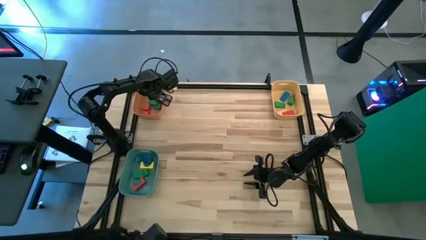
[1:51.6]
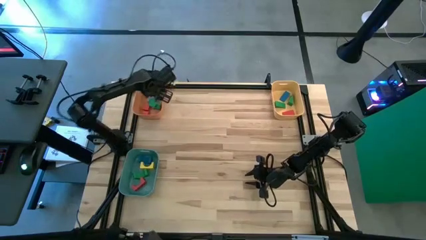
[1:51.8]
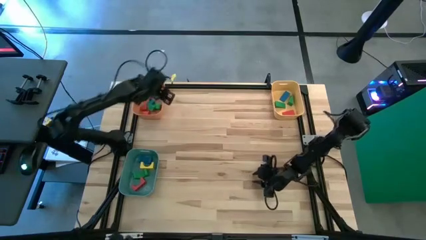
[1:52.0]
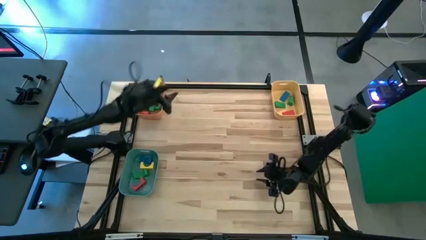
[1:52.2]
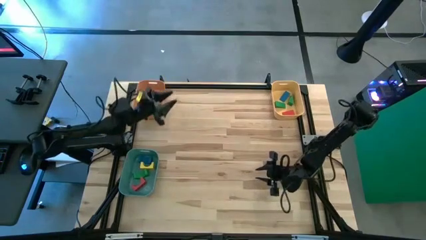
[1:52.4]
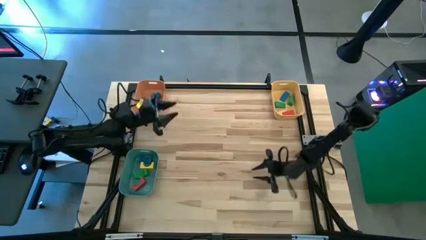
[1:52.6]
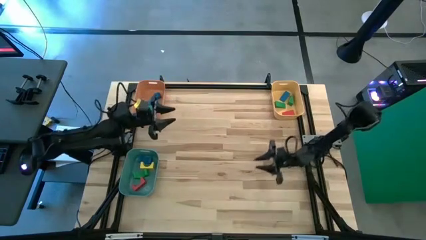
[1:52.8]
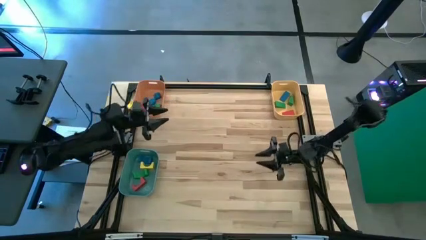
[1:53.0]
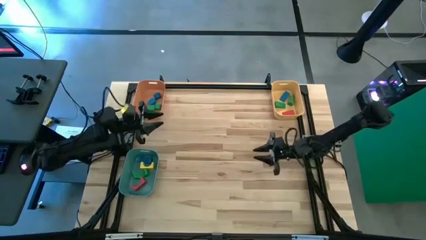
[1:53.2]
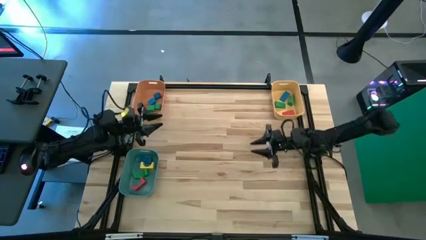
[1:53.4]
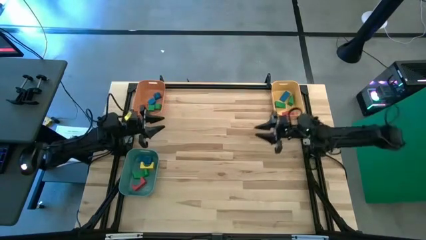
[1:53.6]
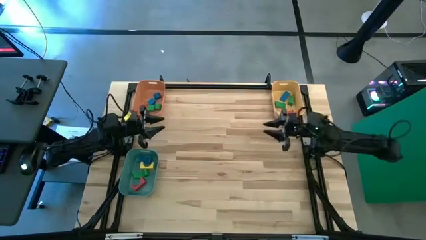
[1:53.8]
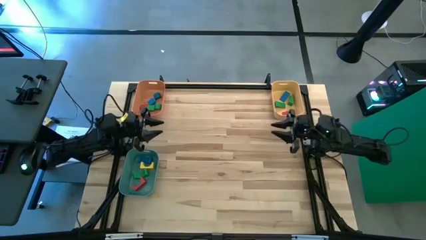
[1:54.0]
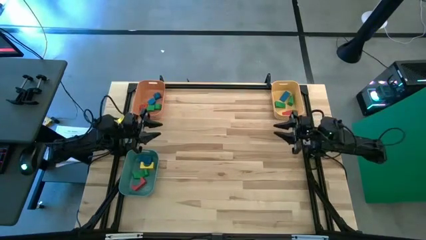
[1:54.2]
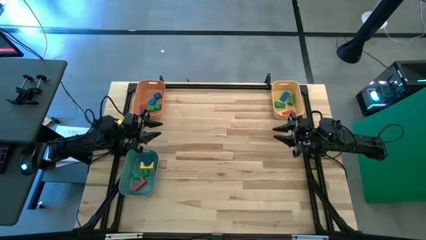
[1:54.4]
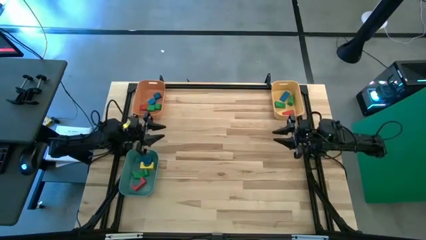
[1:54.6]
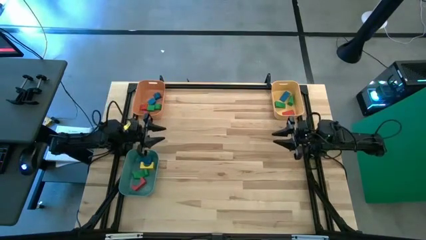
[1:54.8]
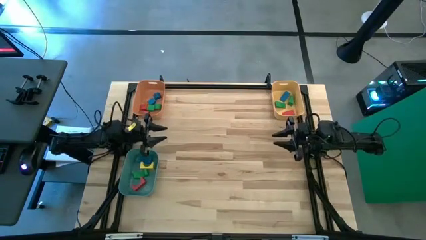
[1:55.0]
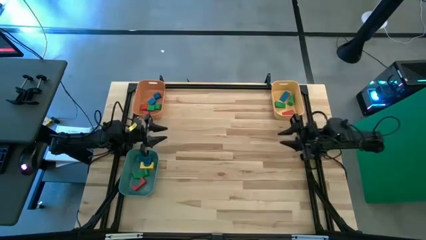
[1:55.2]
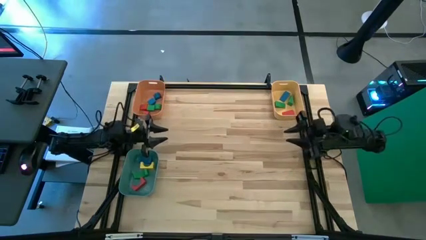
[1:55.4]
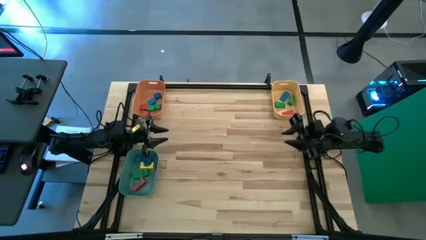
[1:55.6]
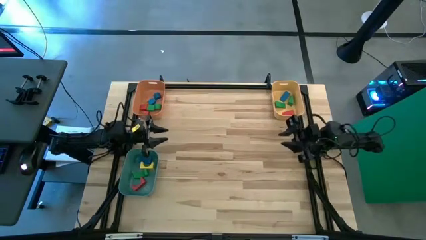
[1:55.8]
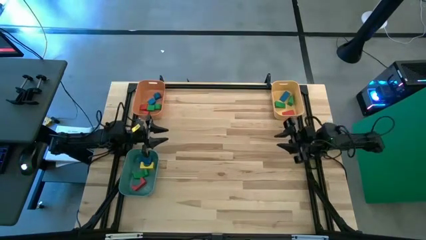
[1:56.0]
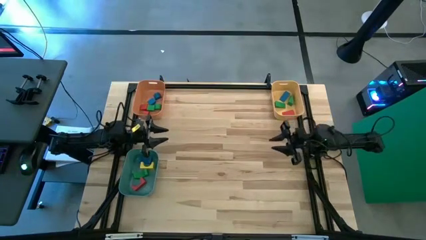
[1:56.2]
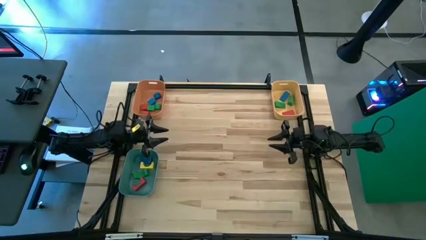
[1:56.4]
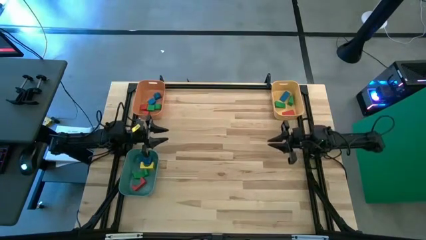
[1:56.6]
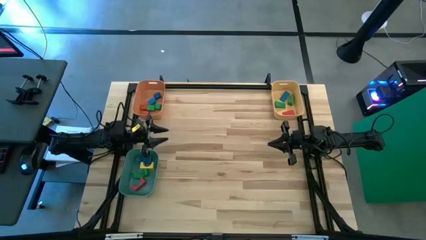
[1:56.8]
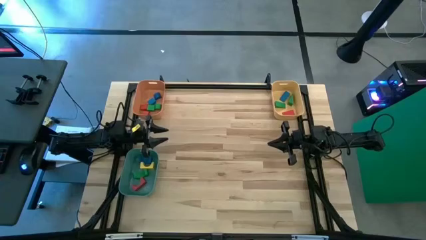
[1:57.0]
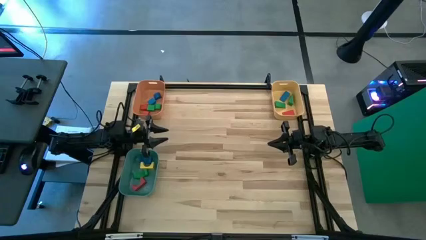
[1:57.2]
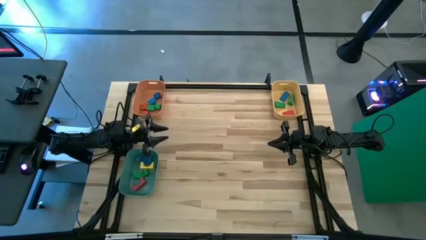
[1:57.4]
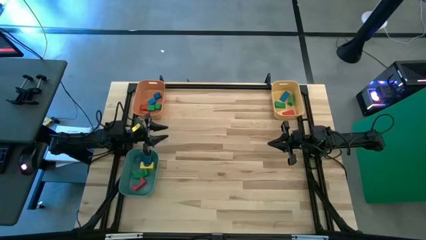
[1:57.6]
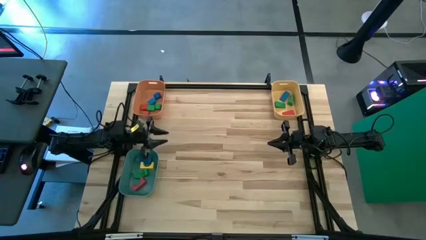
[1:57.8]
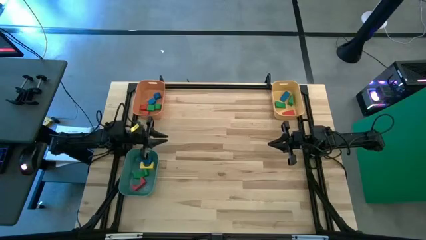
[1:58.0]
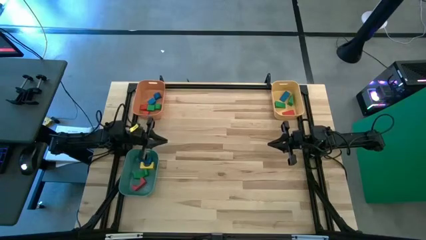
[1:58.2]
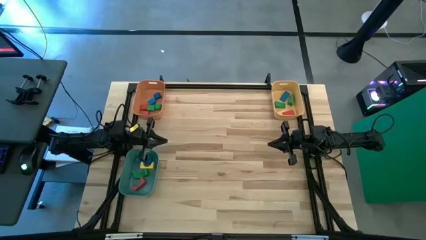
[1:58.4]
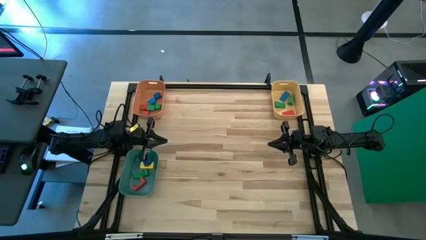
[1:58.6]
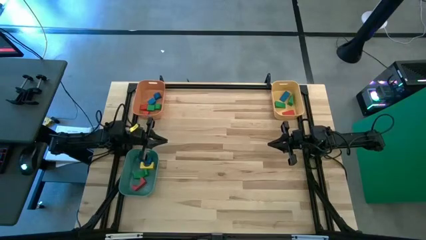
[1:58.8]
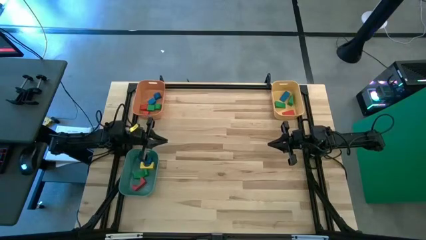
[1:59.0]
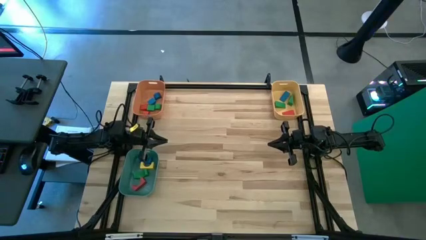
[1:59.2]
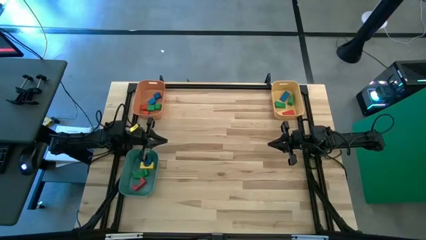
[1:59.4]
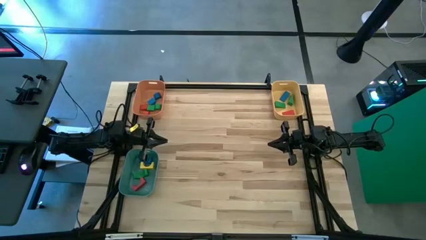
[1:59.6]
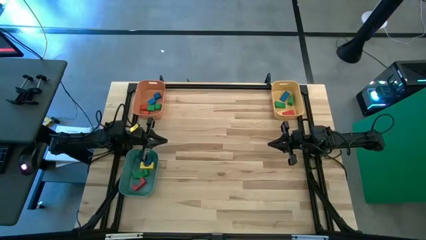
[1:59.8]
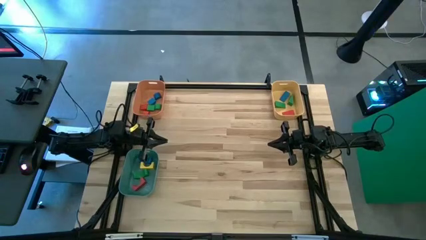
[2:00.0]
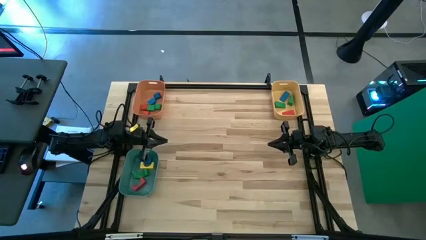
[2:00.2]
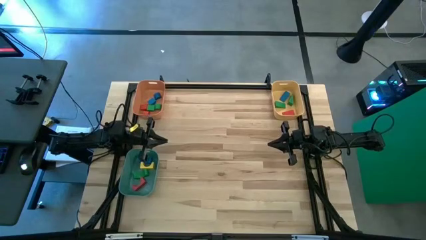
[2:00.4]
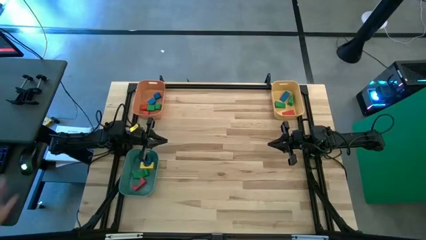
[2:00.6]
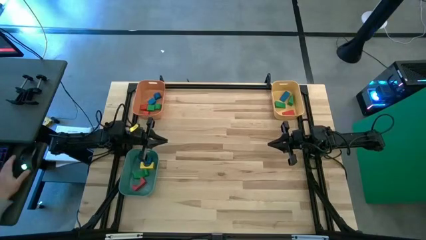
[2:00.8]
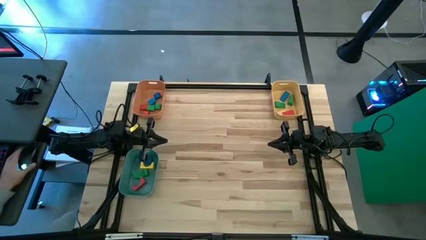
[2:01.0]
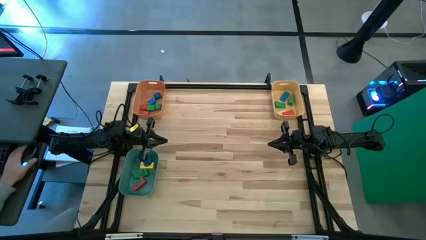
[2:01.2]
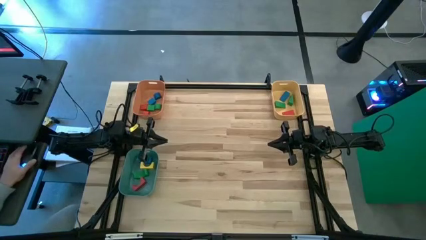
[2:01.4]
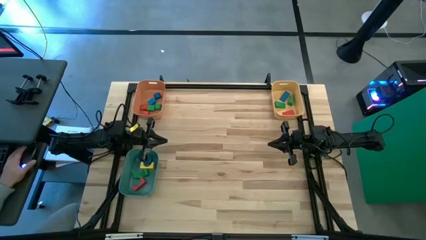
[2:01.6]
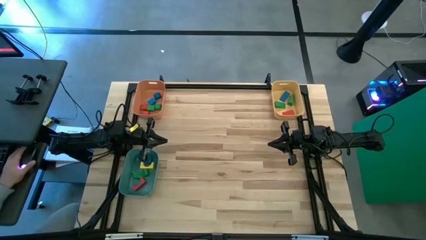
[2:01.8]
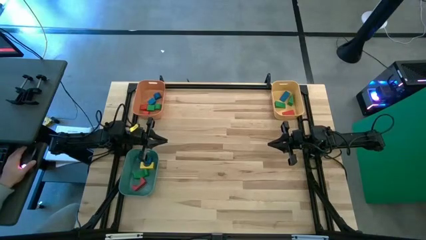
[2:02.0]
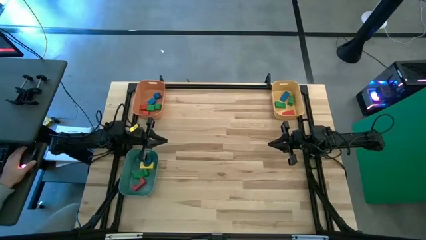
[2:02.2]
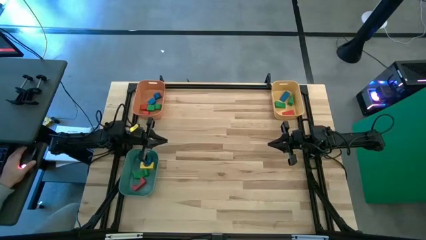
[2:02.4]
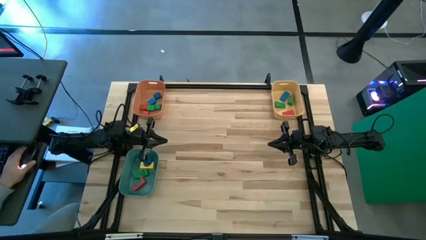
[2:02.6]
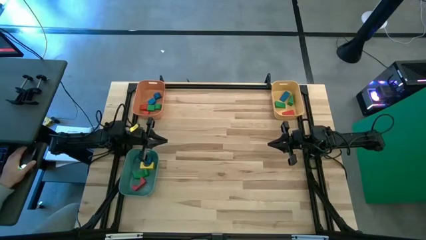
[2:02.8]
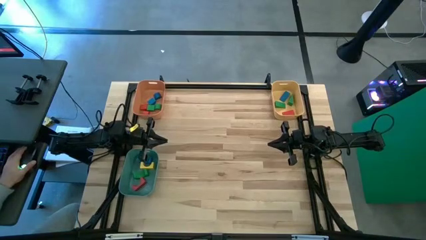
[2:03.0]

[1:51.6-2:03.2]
Task: Sort blocks by size
Return to Home Position
